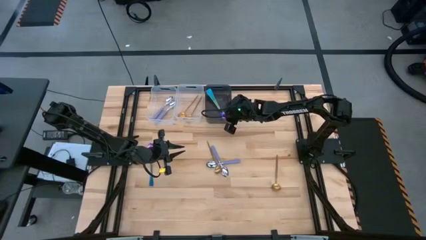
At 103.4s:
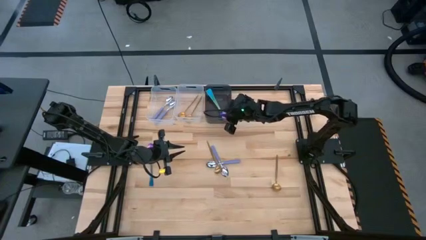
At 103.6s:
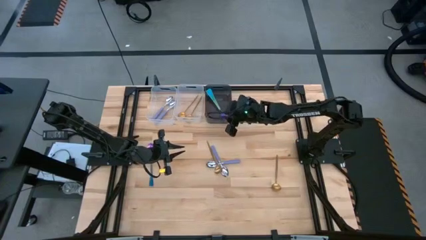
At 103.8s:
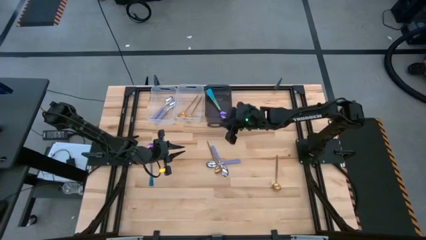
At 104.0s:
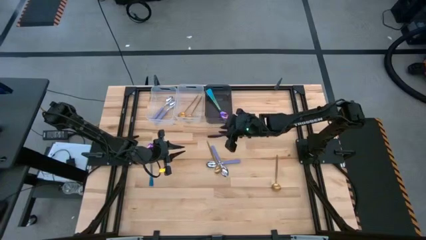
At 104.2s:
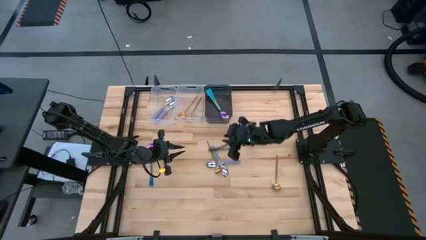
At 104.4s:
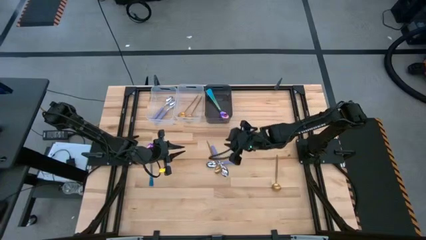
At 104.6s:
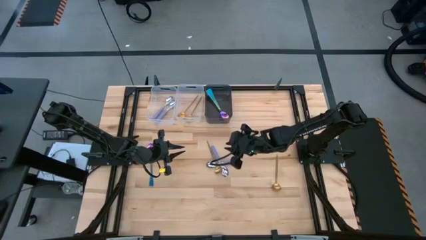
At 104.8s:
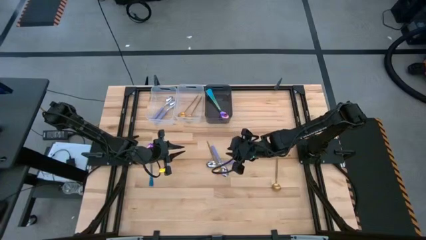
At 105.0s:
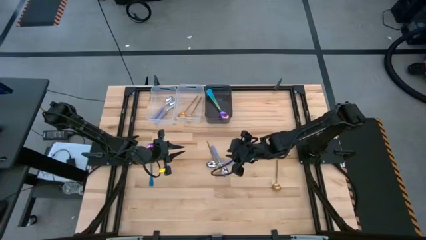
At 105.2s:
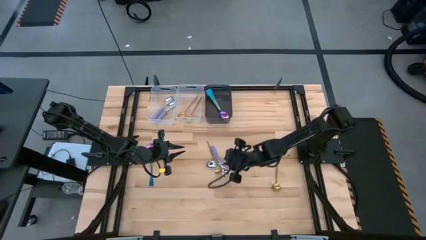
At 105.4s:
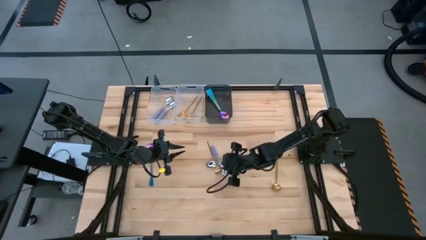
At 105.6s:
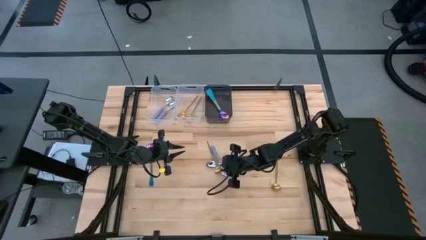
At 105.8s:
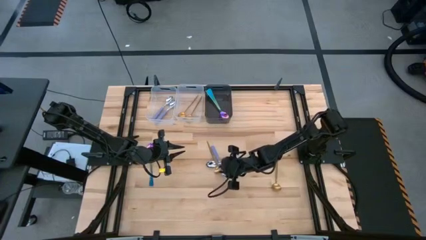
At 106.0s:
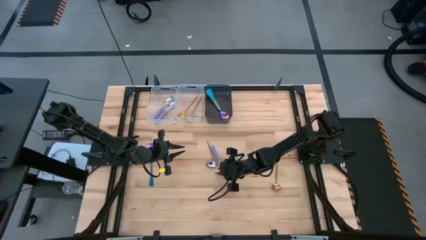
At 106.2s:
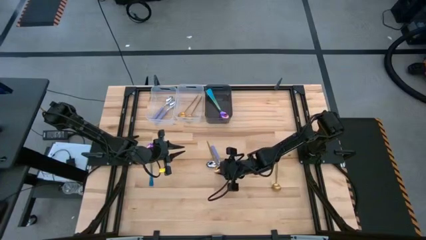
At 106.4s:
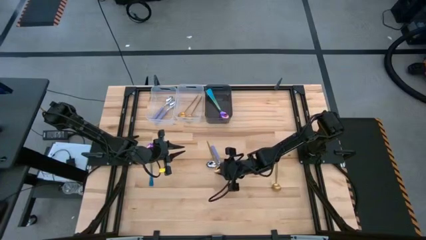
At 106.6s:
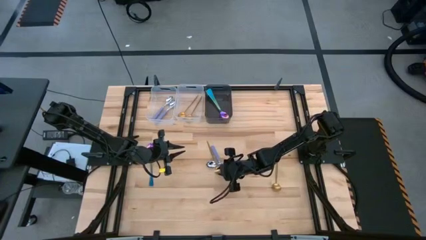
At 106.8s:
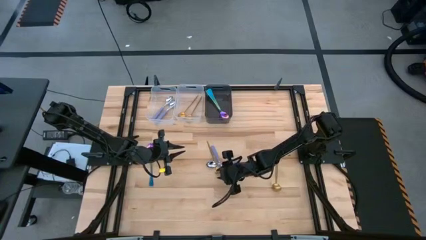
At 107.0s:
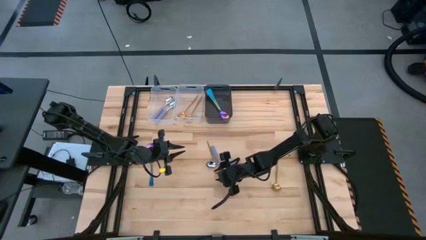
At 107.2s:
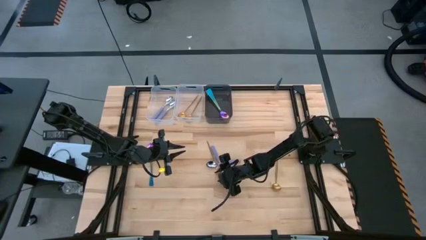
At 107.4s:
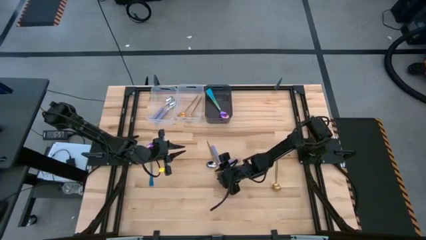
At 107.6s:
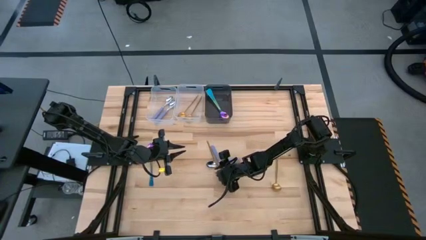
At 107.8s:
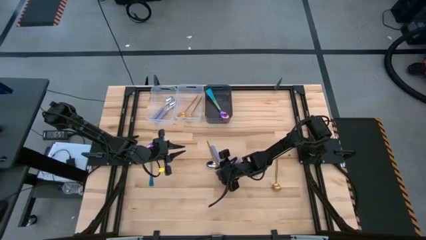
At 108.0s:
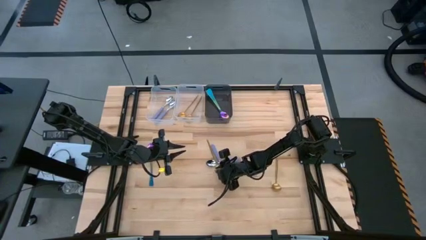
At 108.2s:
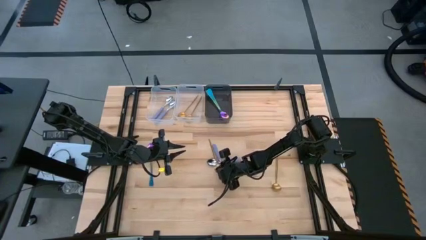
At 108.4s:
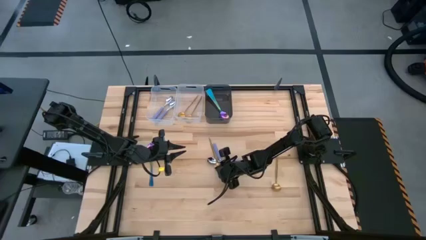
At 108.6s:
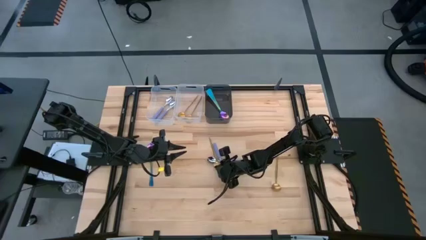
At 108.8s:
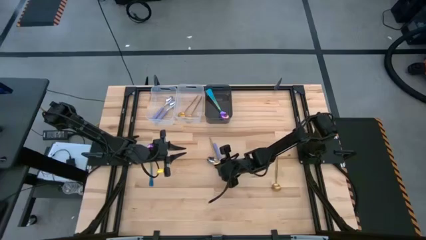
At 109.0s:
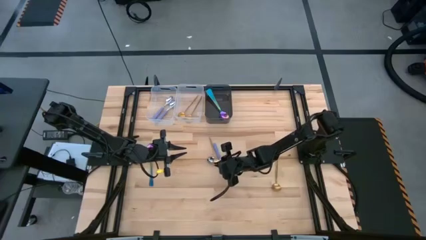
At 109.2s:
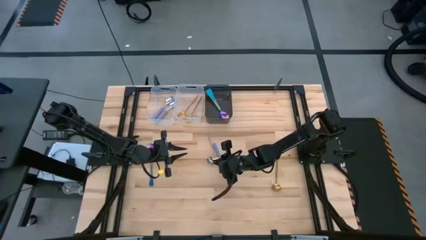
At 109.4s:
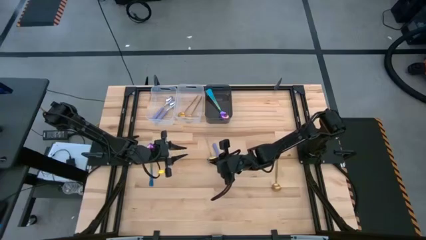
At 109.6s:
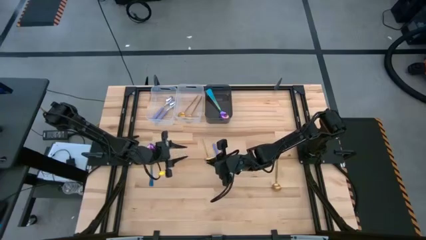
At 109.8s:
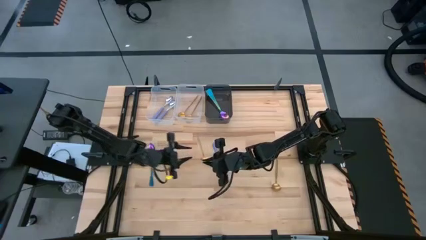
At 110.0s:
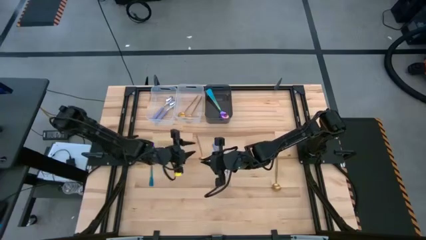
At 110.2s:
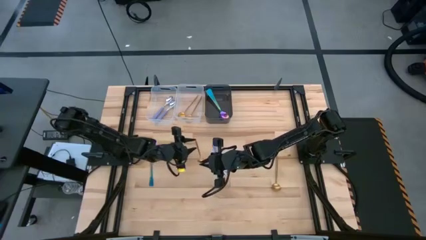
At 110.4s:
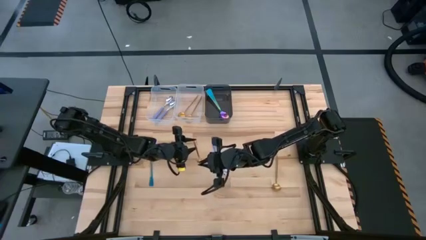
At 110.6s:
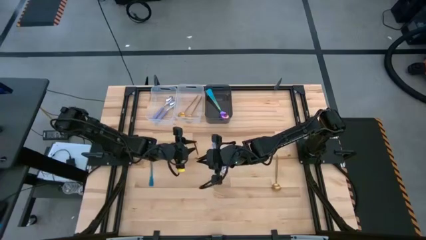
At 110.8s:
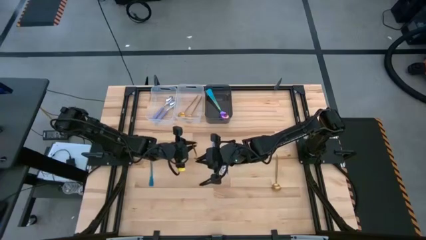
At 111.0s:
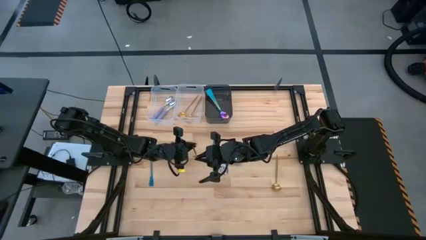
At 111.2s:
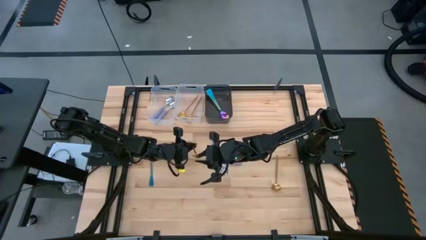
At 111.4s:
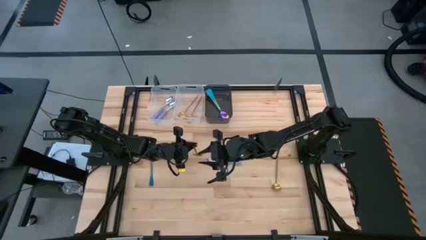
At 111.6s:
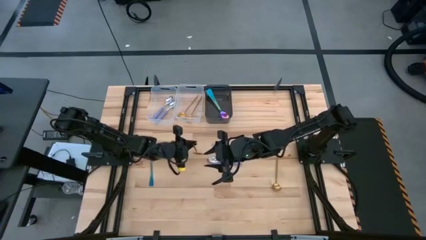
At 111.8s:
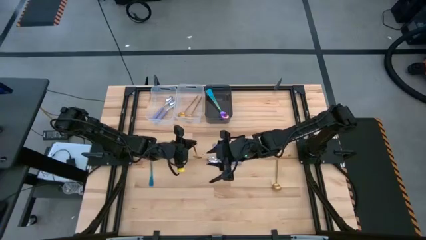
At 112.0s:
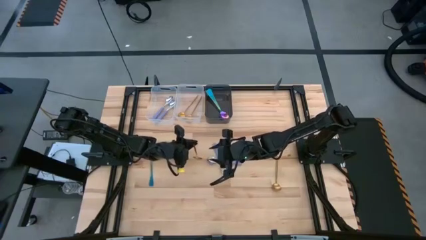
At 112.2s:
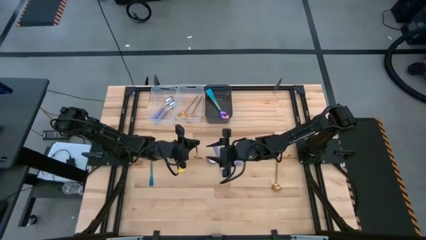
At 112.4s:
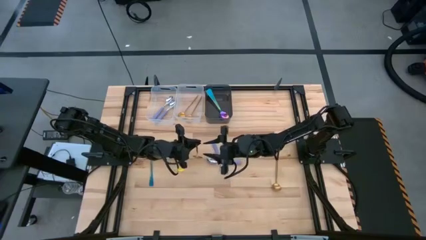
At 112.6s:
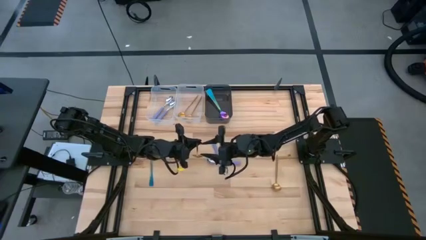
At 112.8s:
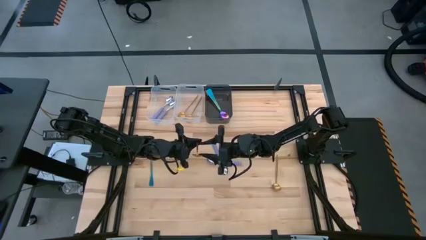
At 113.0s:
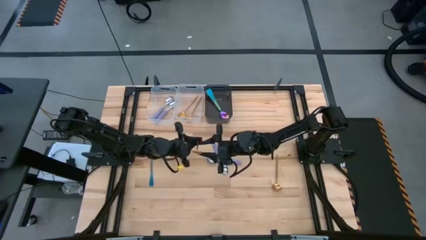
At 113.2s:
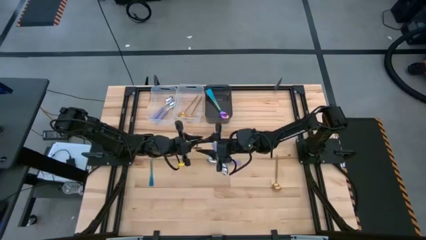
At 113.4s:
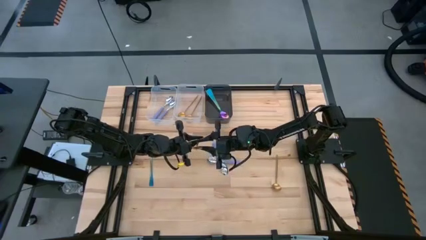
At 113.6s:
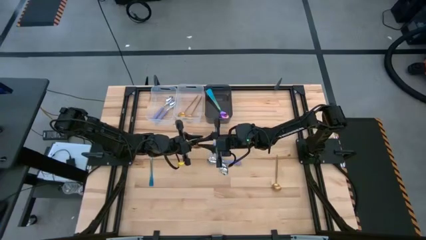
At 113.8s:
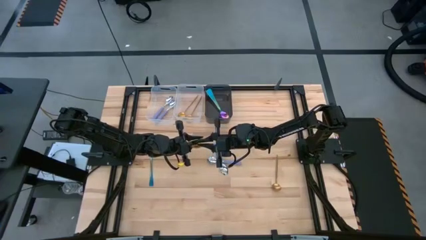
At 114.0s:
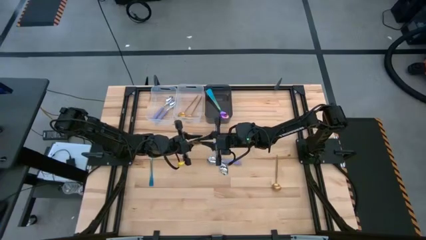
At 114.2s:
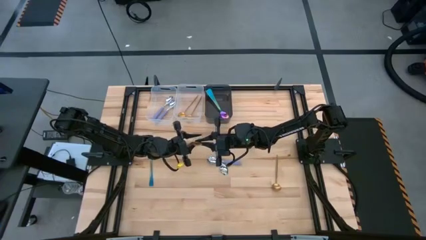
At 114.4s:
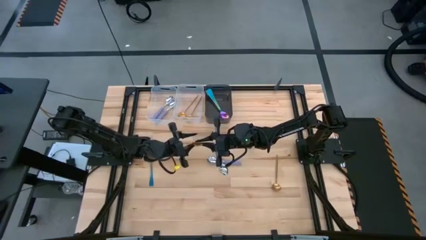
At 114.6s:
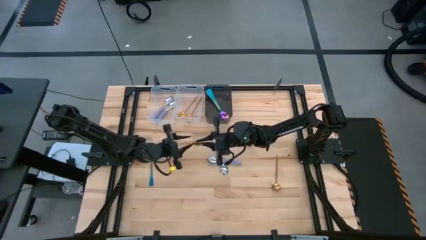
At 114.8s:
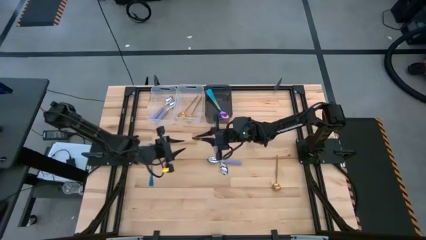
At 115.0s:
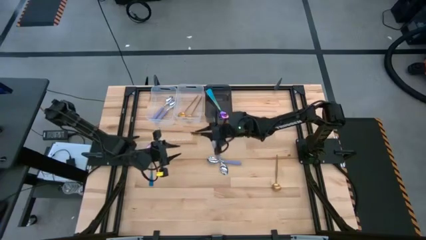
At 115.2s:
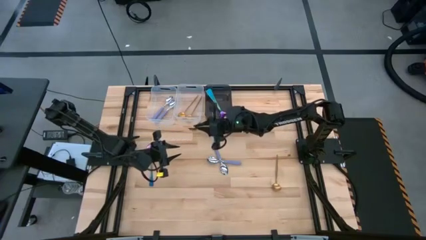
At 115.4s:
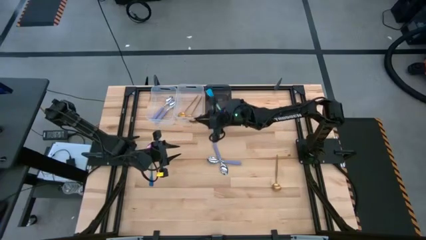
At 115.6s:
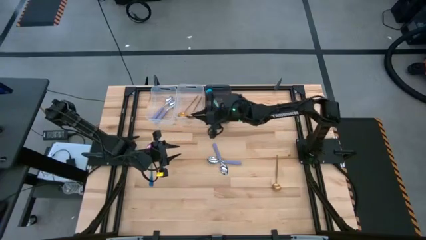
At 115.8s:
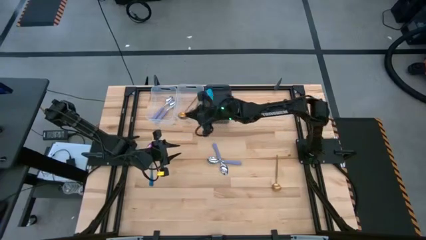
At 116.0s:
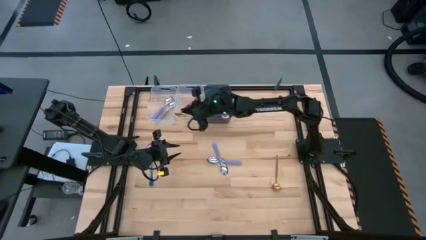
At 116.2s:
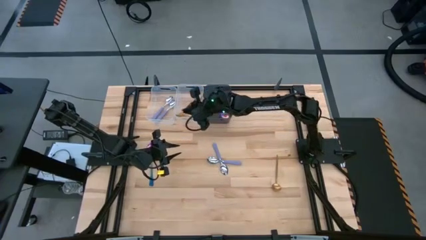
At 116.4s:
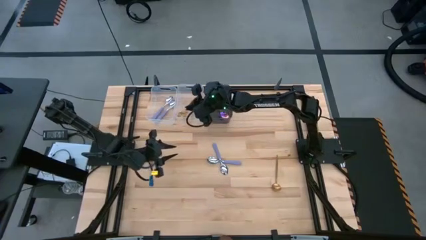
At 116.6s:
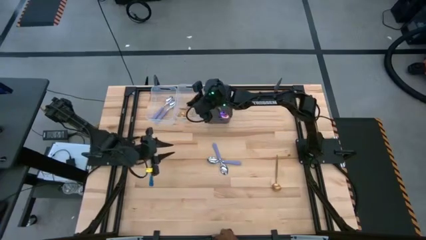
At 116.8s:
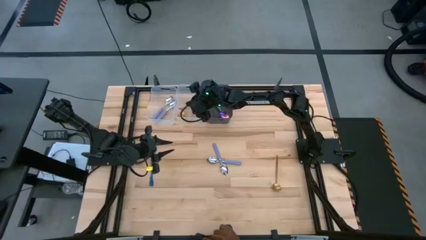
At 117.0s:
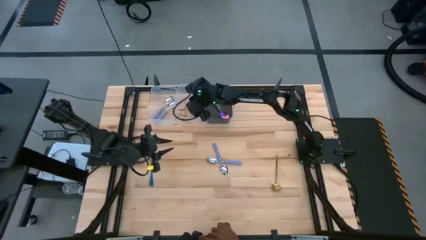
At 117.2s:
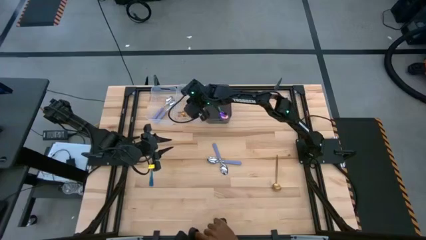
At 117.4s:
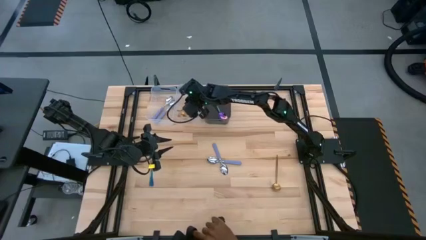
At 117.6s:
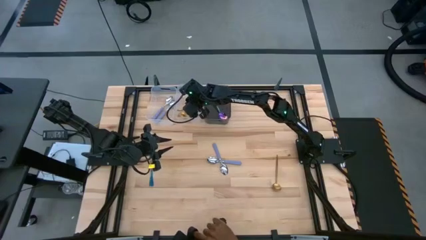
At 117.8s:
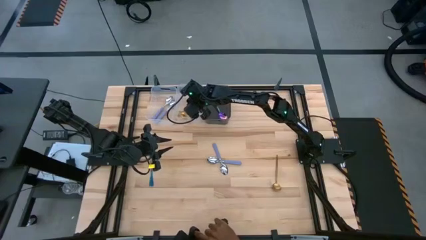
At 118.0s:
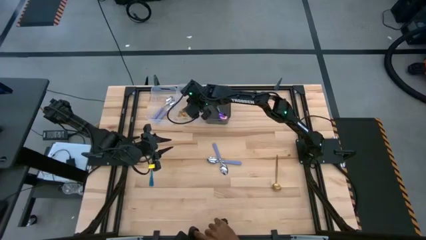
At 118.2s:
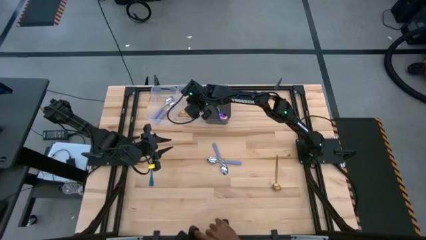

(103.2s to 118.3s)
Task: Sort silverware by color (type)
Put the gold spoon into the right transparent bin

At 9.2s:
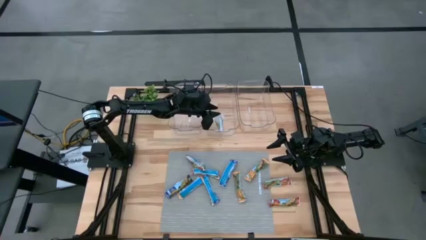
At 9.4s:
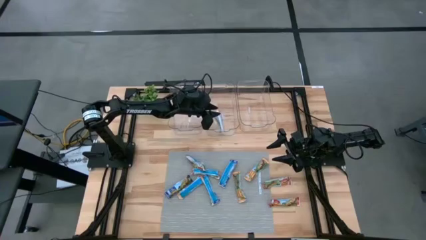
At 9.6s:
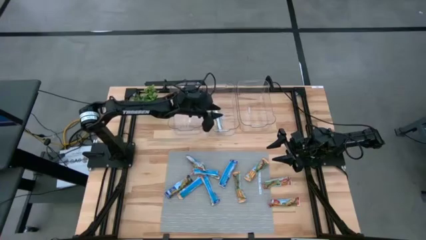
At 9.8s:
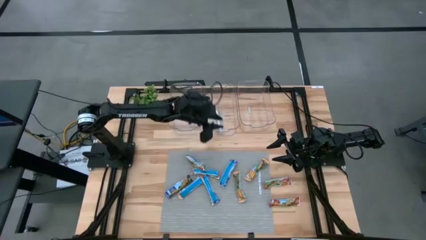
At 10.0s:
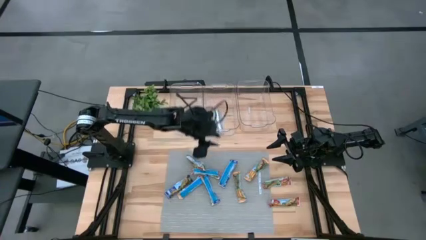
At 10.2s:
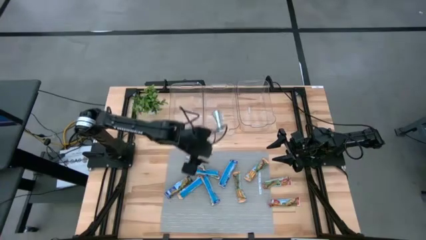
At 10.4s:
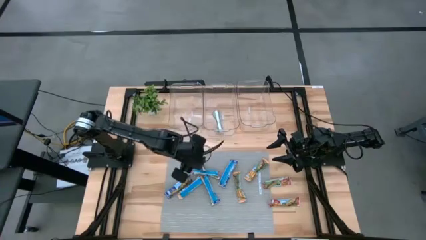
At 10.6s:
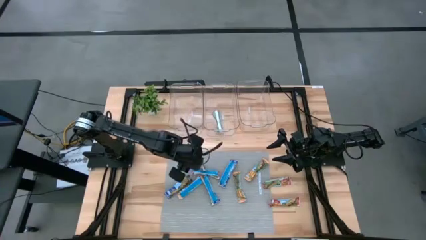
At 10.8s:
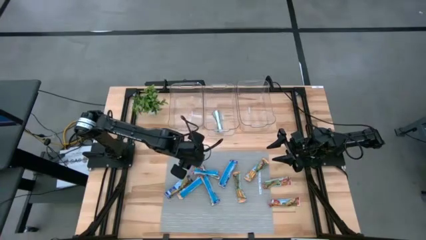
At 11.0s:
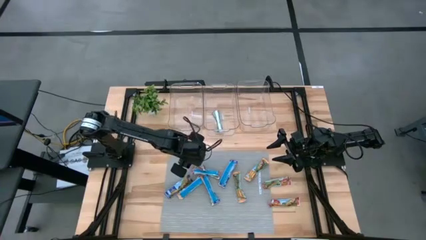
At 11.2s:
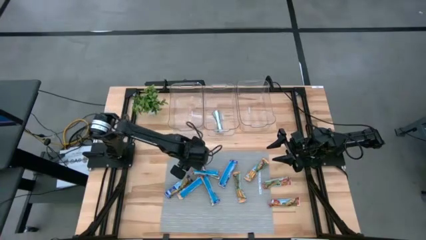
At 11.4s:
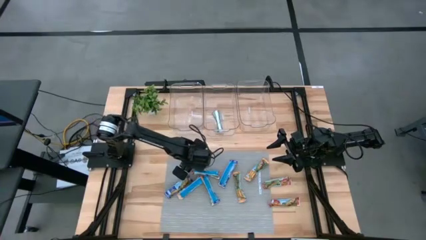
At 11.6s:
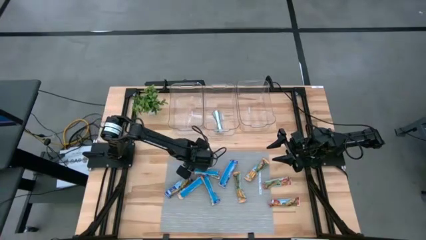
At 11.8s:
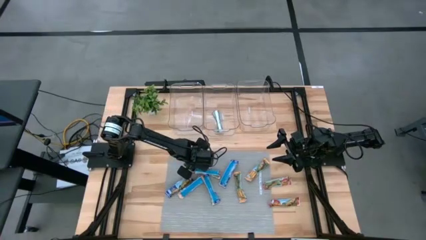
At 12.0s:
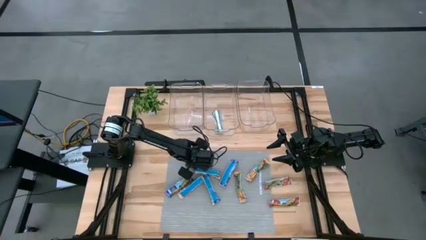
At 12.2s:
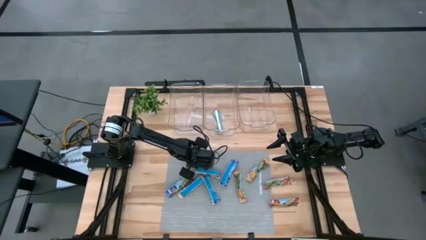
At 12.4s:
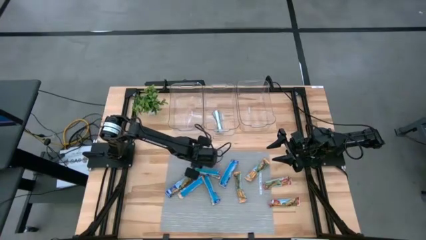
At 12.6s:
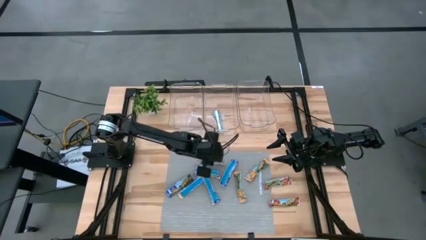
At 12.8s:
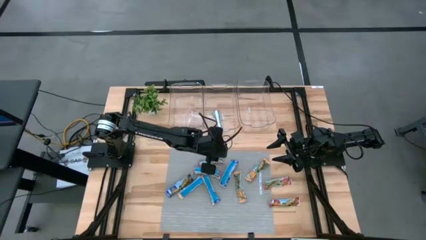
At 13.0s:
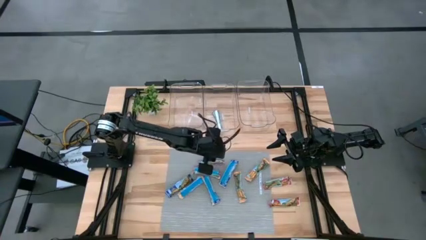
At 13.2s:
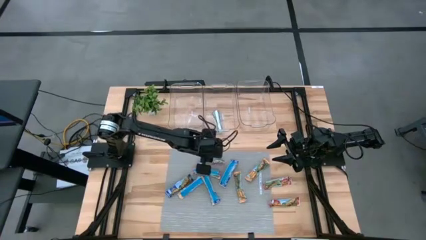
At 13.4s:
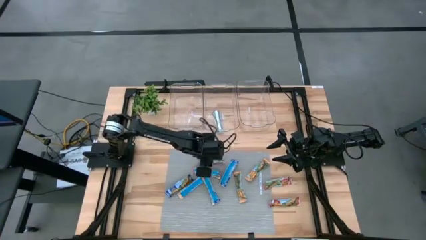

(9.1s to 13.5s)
Task: Pick and place Granola Bars by type
Put the red granola bar into the left transparent bin
